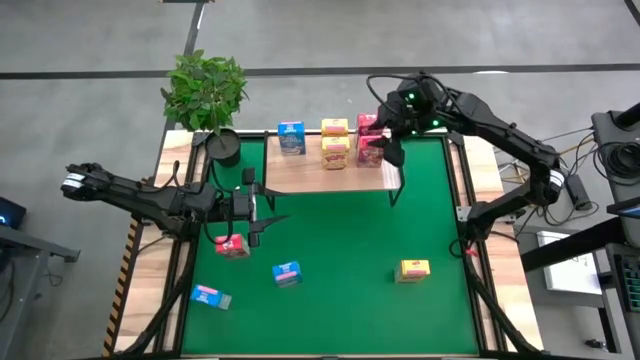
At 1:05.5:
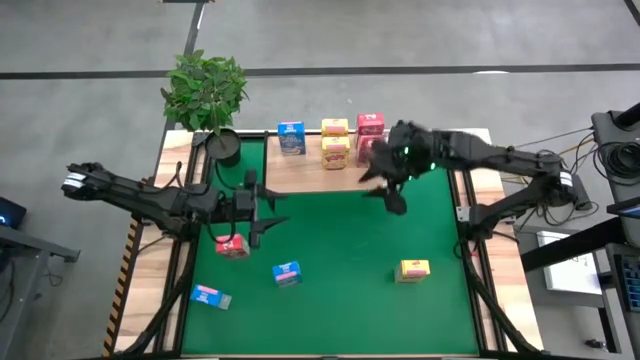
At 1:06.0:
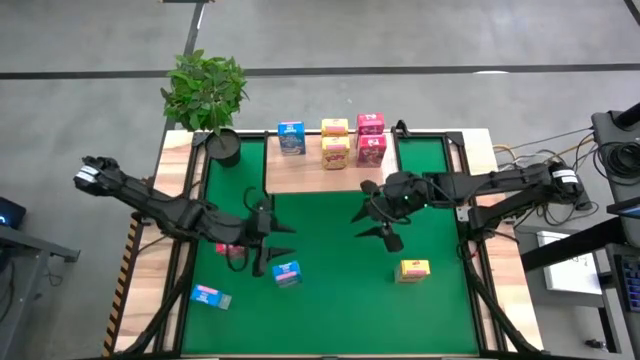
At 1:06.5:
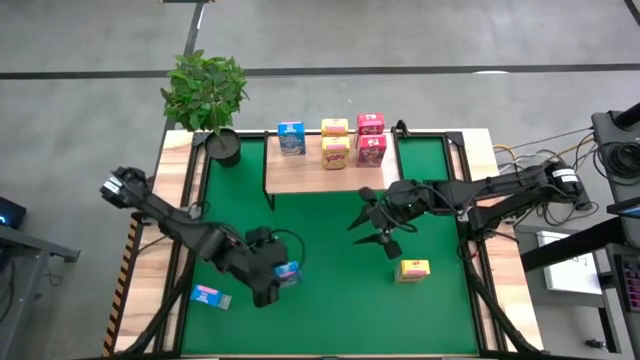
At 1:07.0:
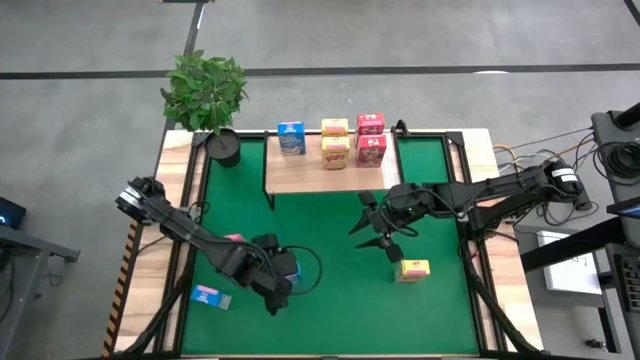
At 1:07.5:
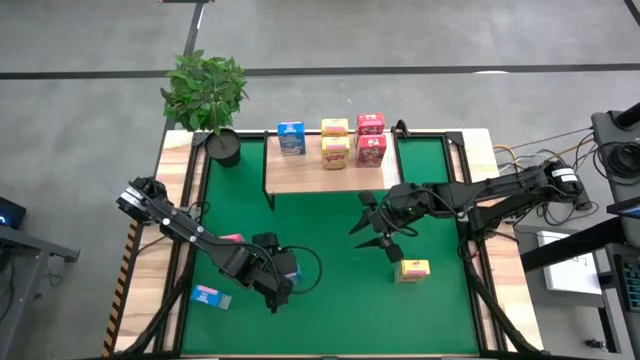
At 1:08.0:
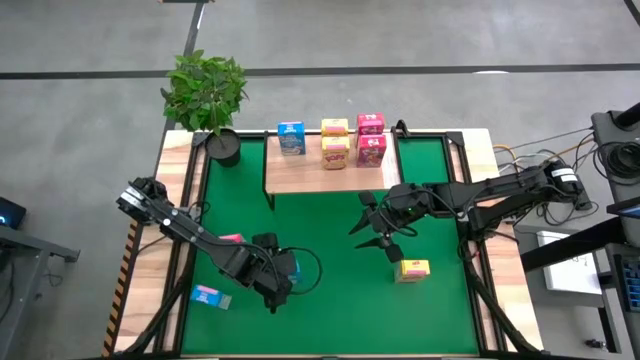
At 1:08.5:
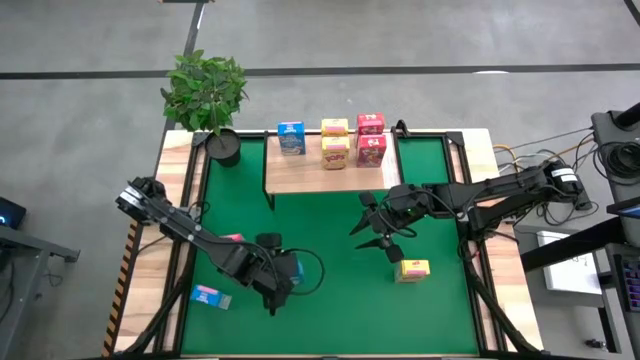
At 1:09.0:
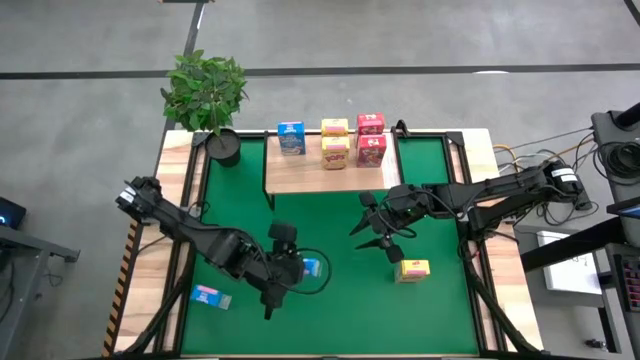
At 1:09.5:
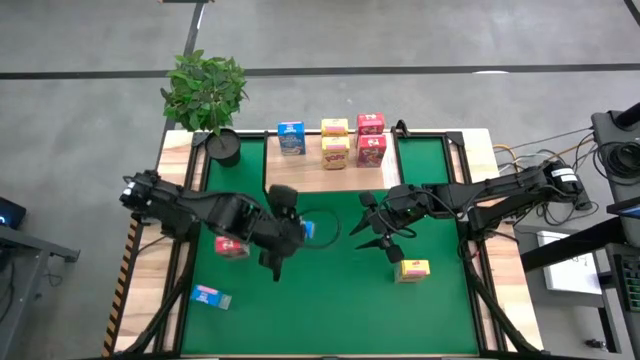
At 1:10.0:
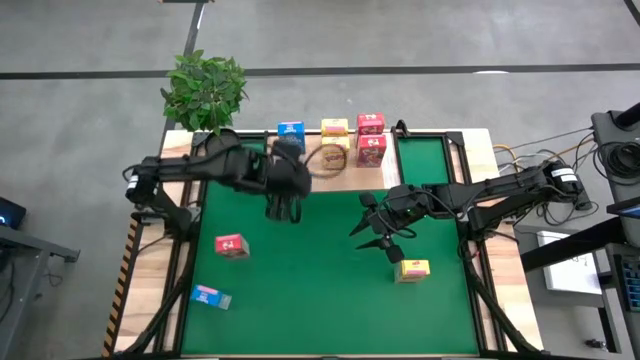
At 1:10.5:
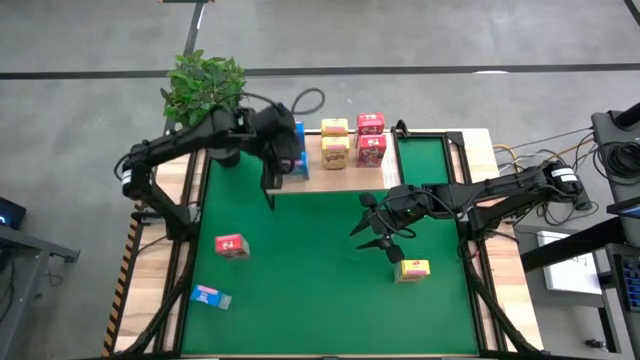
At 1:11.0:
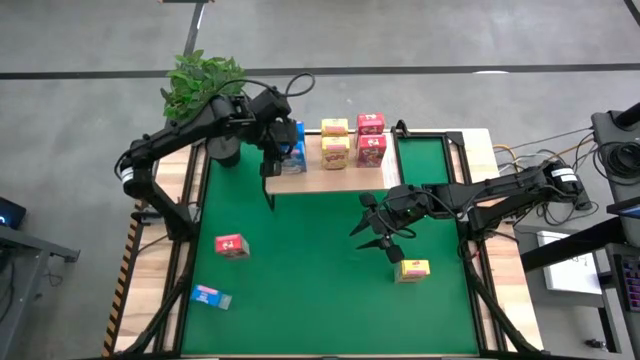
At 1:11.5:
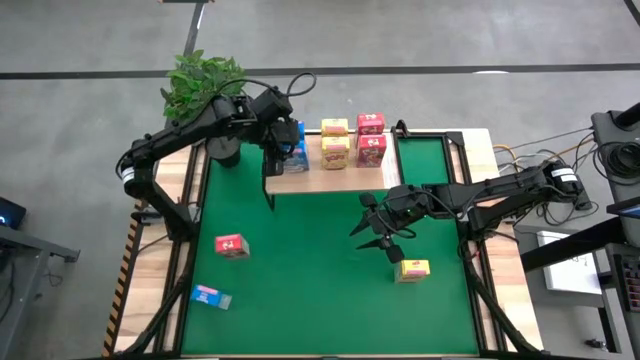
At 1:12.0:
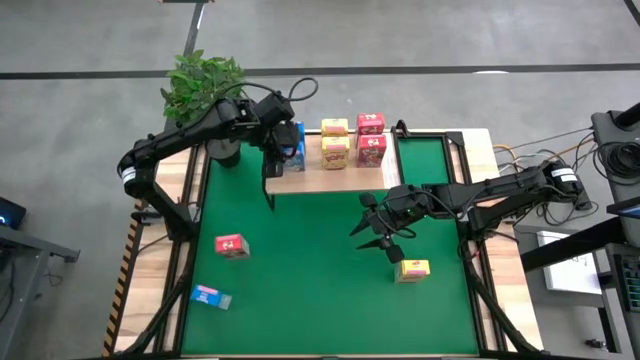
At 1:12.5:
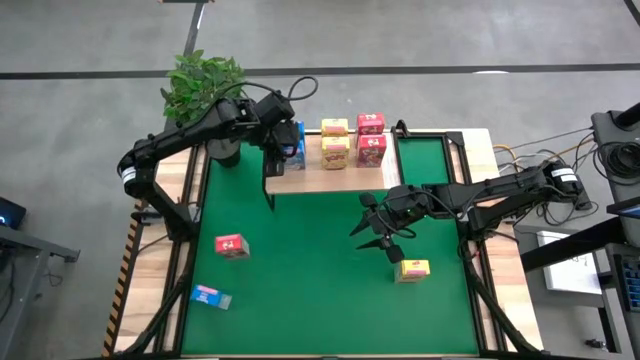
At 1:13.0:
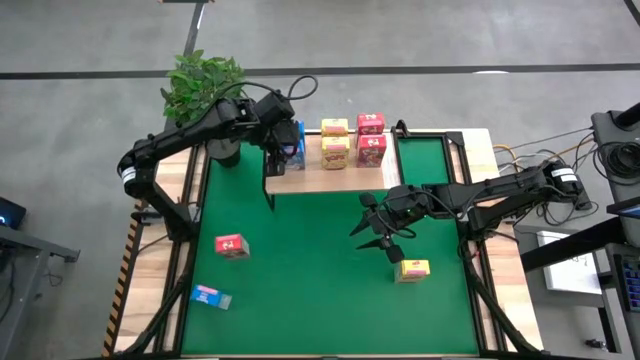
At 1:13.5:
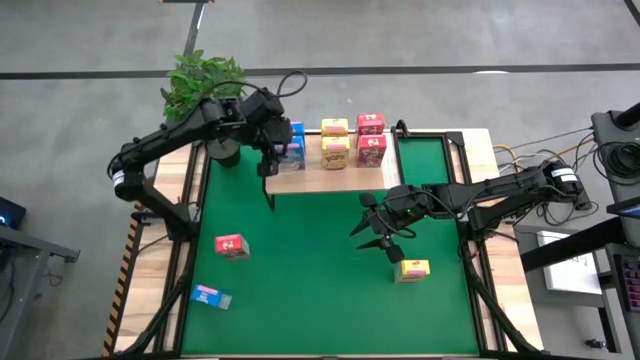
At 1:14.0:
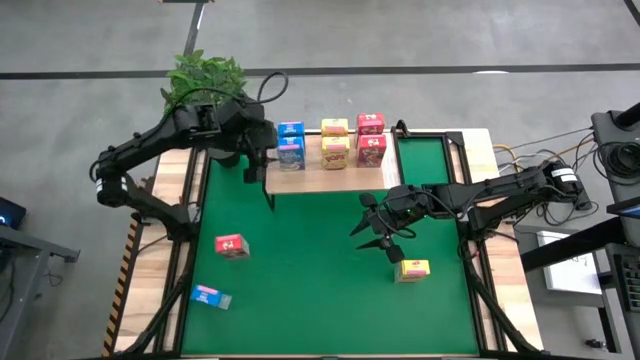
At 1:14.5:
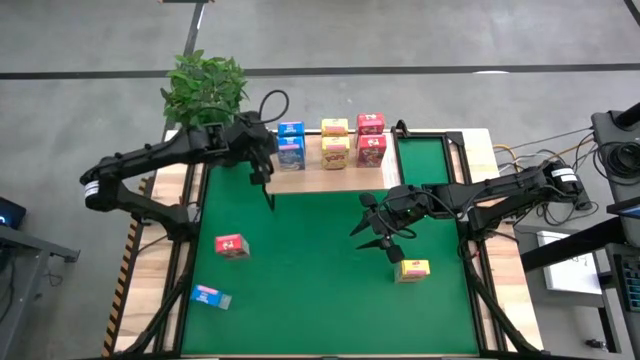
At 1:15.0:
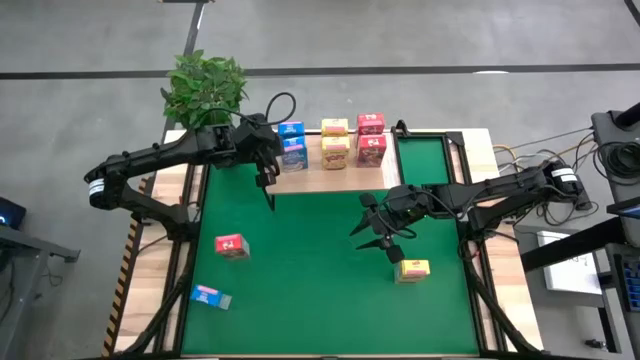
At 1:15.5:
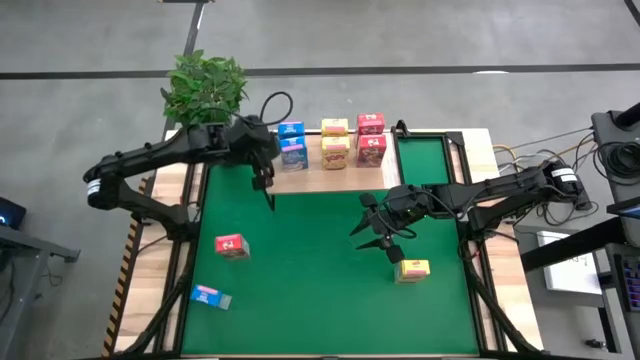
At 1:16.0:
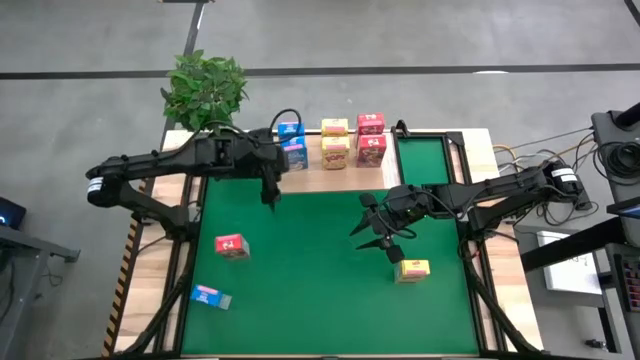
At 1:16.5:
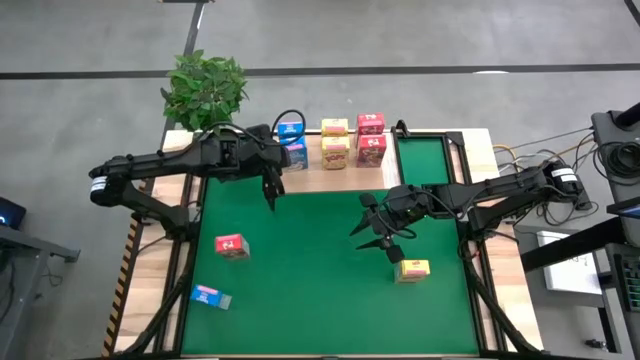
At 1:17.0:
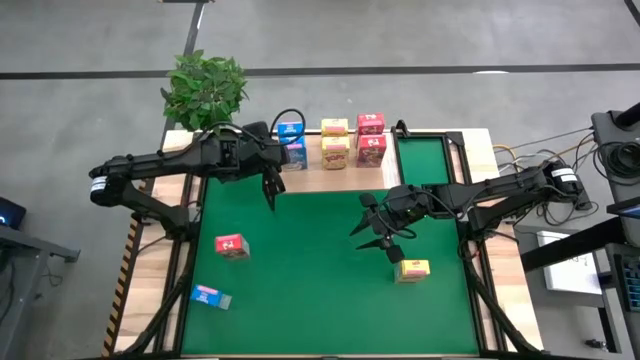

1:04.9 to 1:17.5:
Task: Stack cereal on shelf
Put the right blue cereal box on the shelf aligned with the other blue cereal box

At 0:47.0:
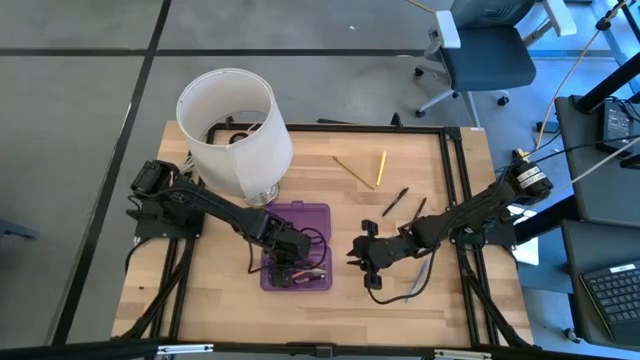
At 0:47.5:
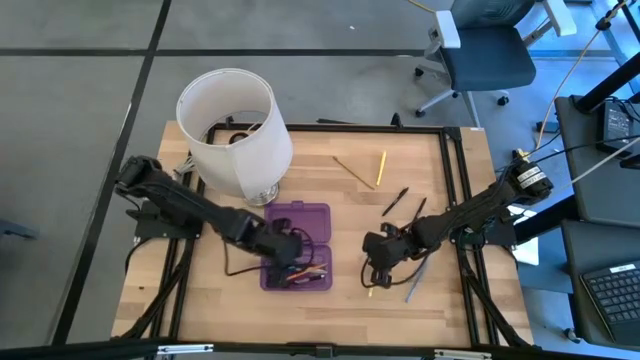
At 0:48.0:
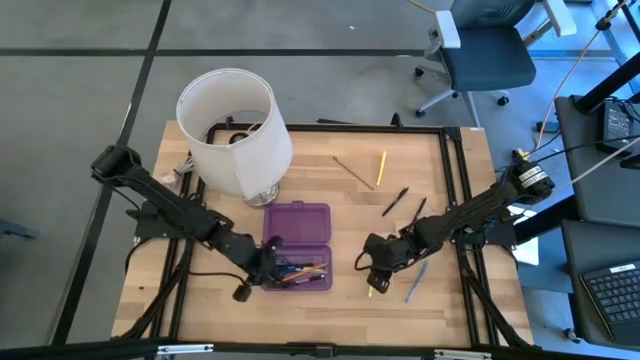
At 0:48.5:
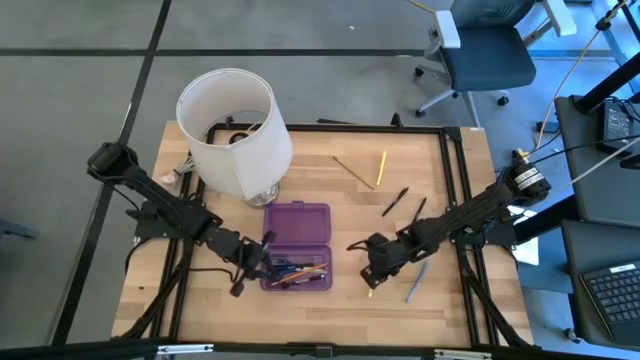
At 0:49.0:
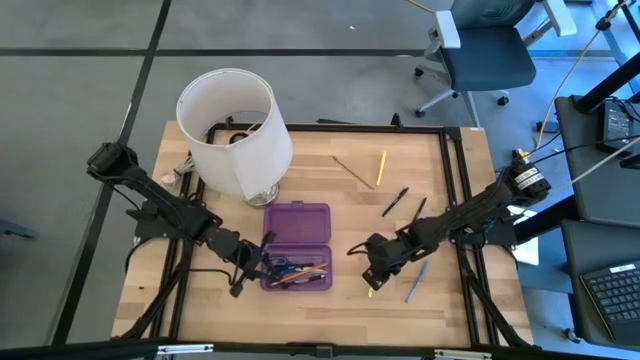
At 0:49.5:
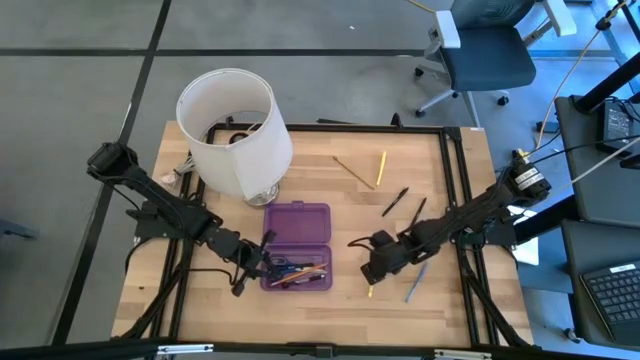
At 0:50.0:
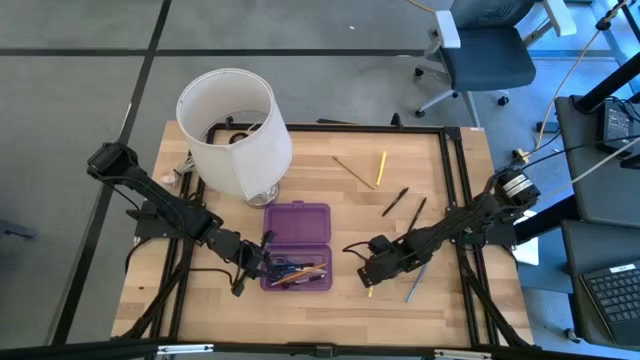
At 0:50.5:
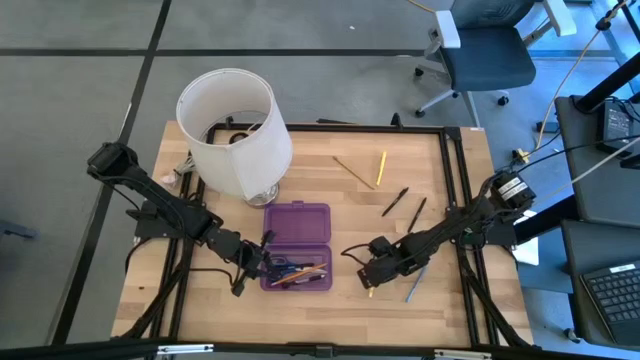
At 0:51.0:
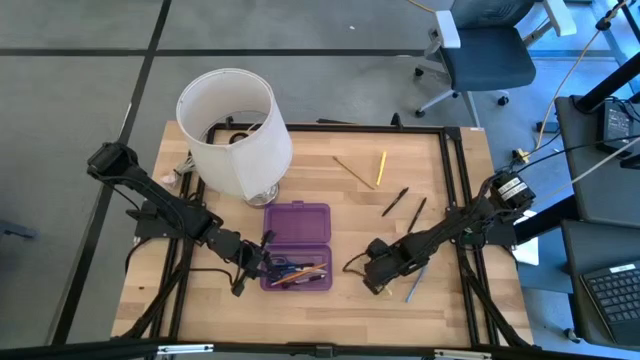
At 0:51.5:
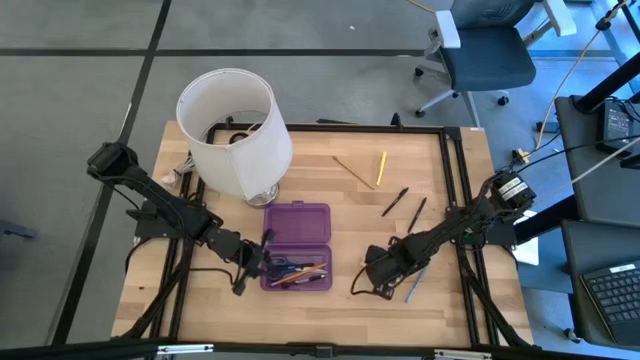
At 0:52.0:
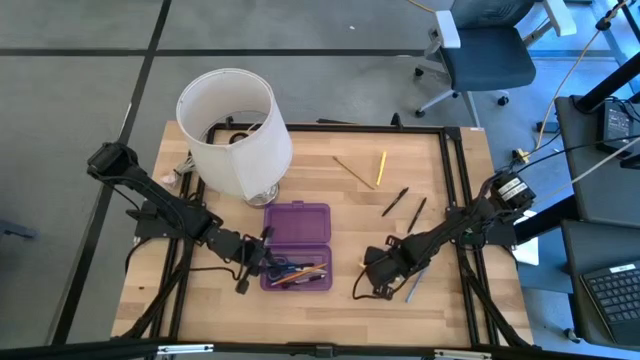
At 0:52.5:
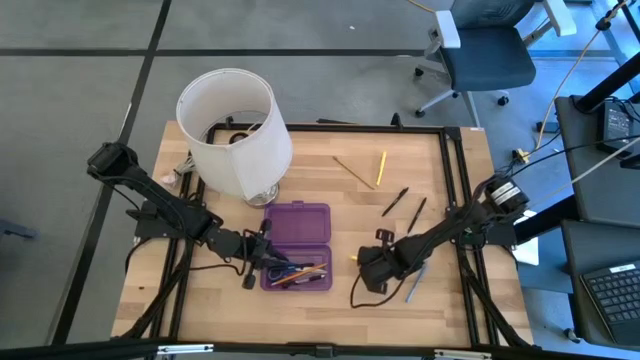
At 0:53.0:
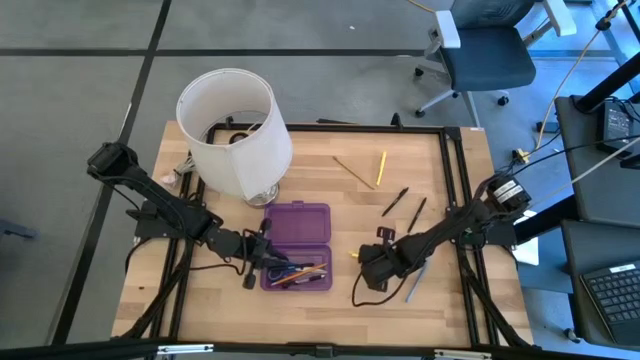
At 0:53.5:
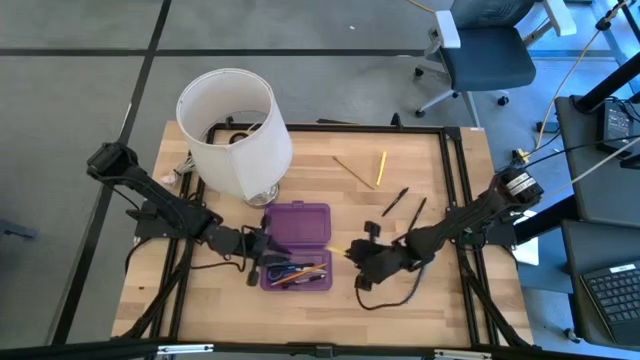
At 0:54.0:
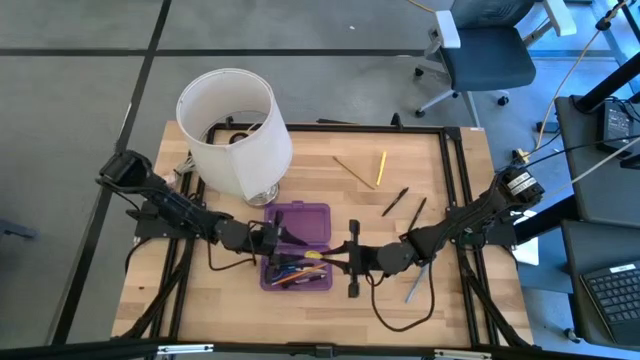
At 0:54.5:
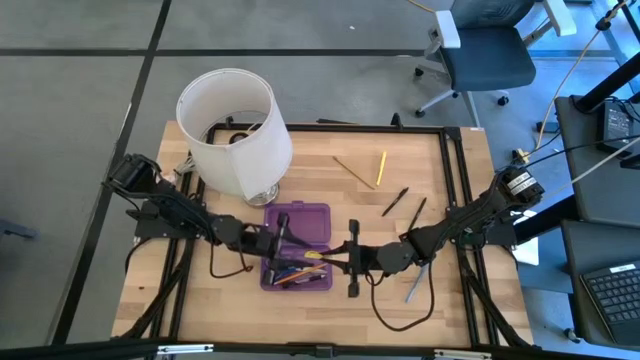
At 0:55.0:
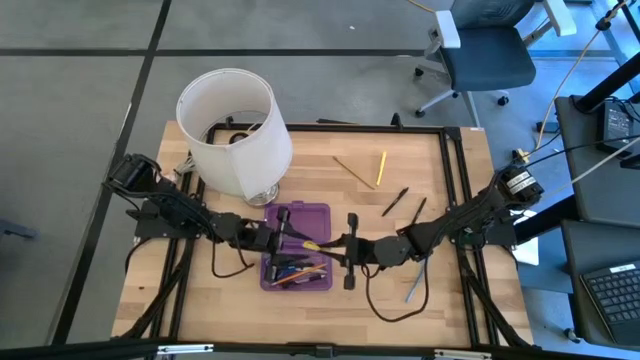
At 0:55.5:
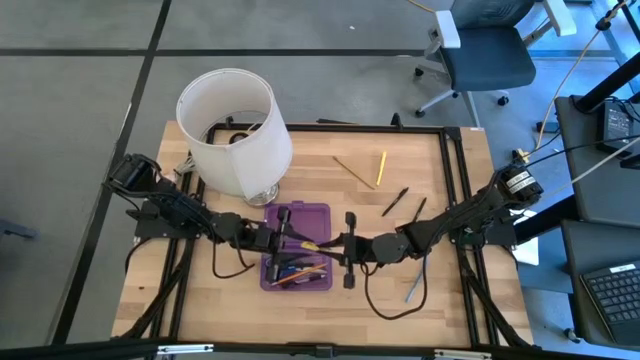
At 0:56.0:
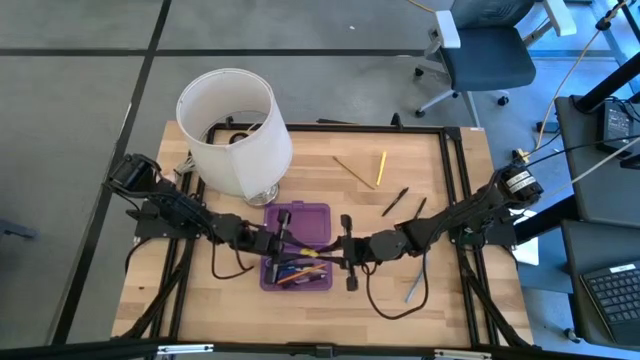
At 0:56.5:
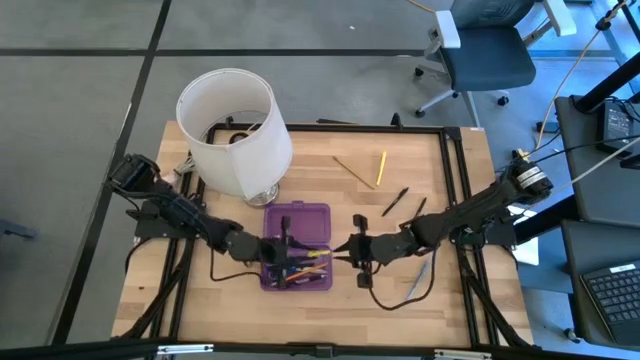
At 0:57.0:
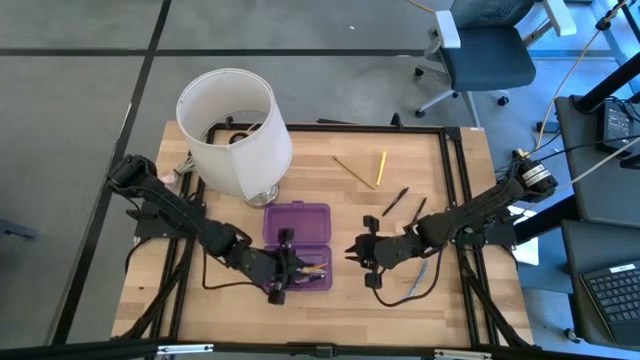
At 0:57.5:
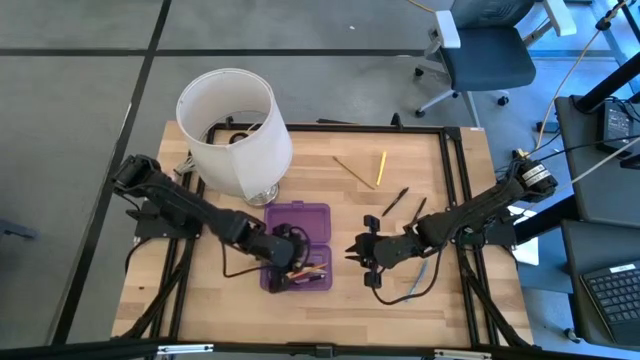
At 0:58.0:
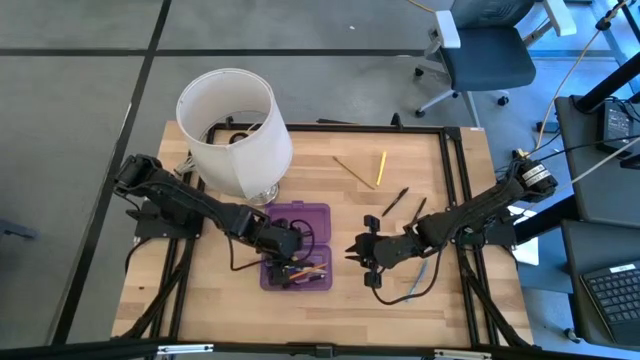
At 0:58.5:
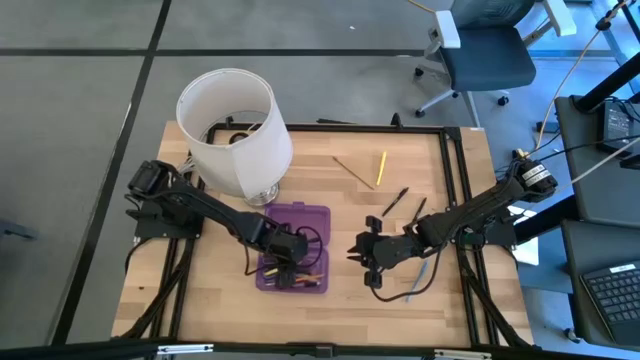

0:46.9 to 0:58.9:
Task: Pick & place school supplies into a supply box
Put the yellow pen into the purple supply box
